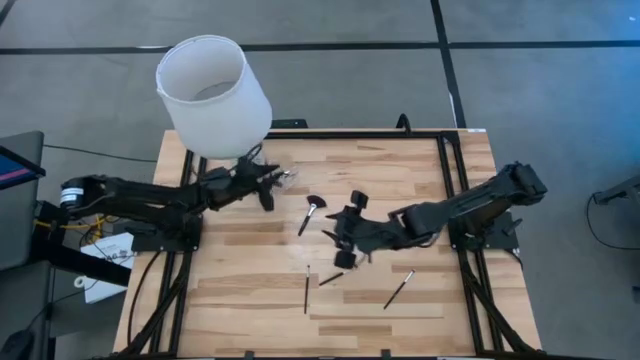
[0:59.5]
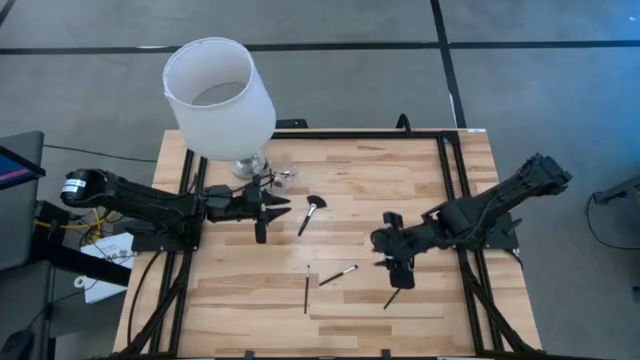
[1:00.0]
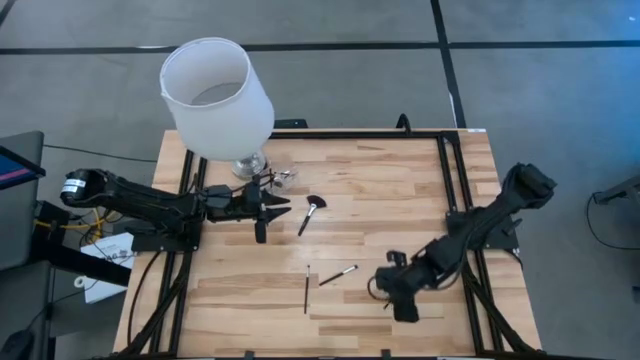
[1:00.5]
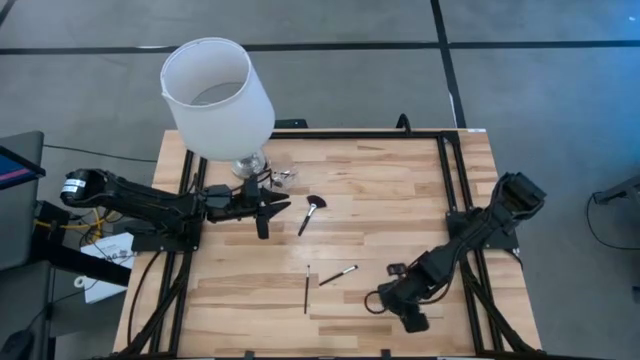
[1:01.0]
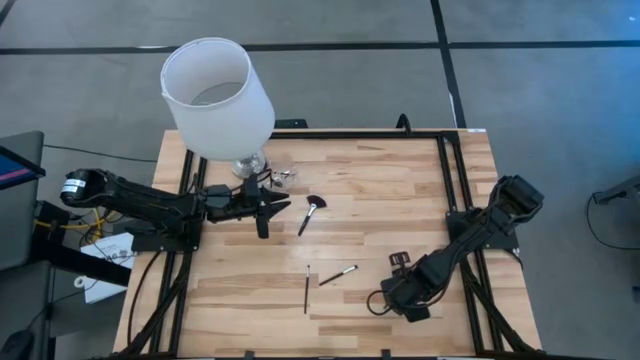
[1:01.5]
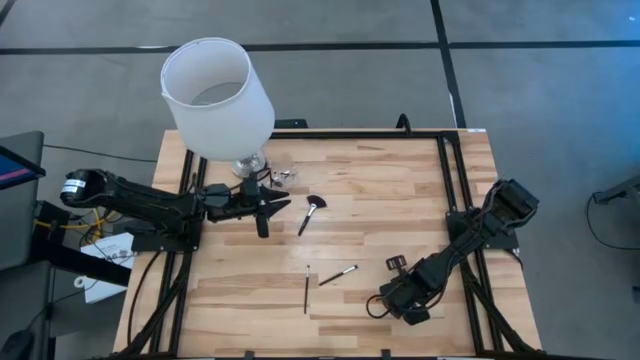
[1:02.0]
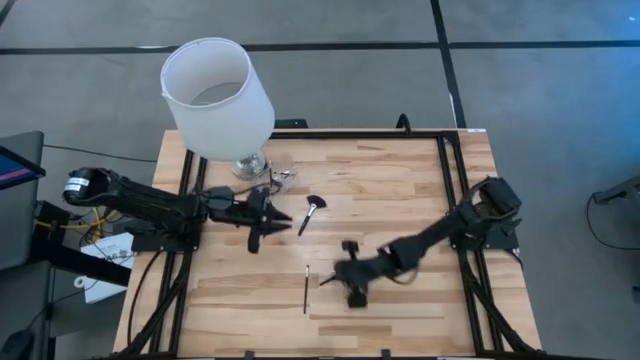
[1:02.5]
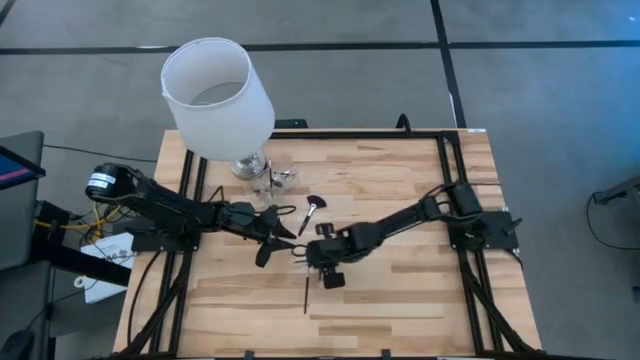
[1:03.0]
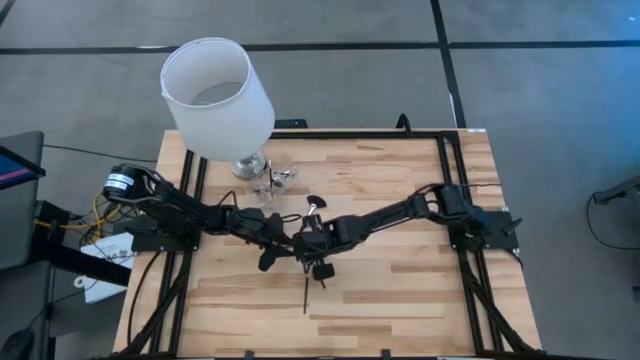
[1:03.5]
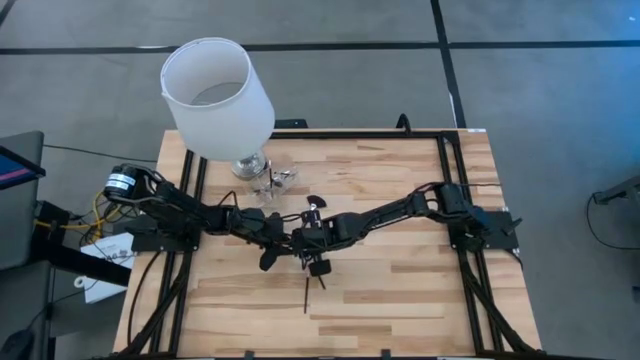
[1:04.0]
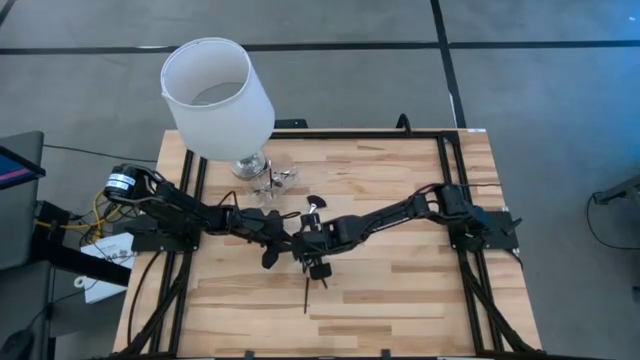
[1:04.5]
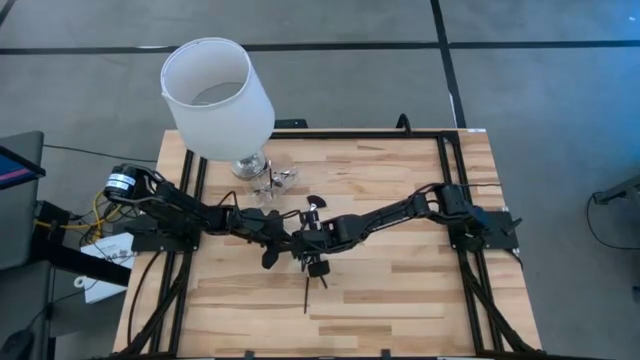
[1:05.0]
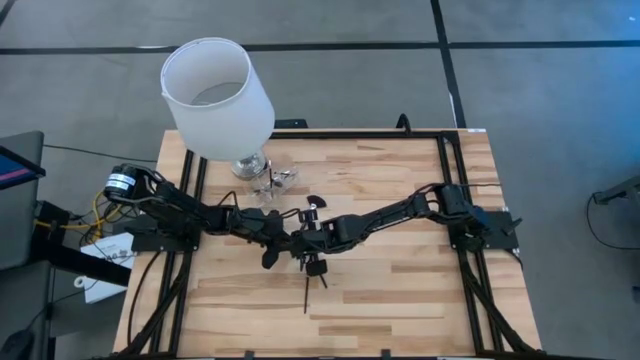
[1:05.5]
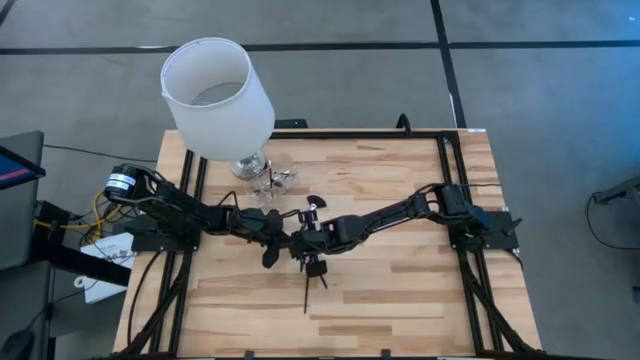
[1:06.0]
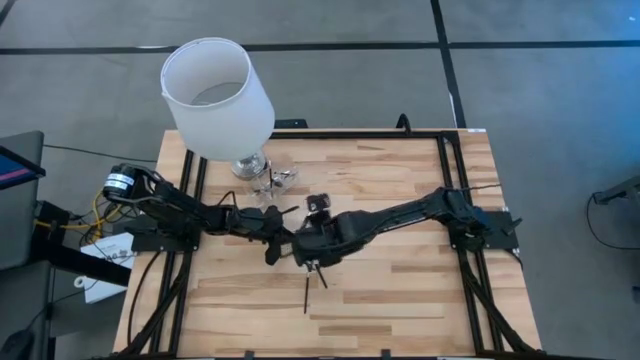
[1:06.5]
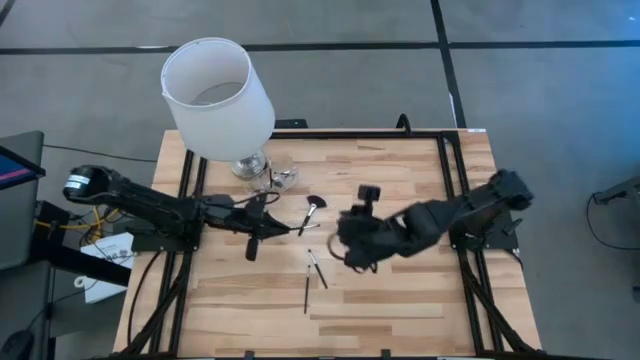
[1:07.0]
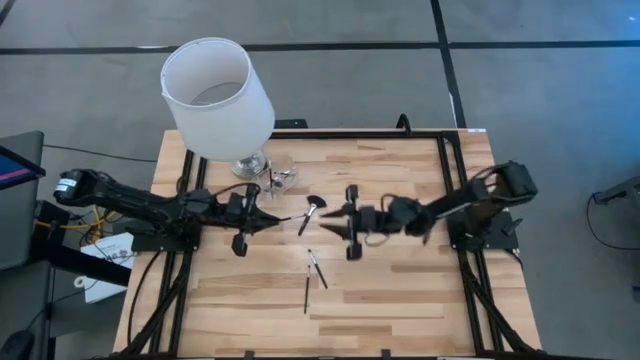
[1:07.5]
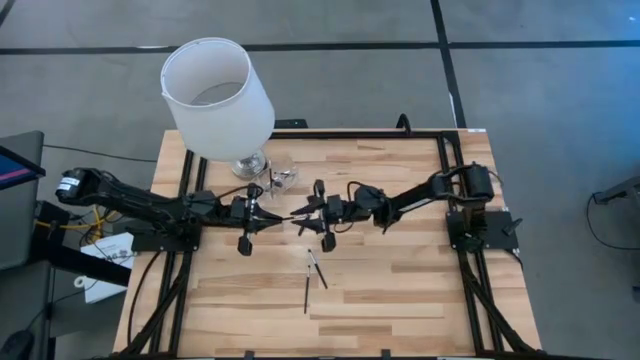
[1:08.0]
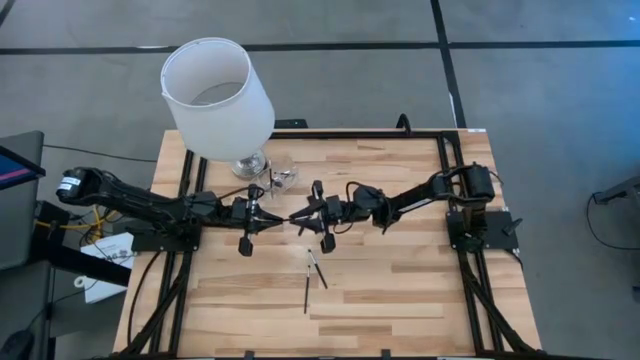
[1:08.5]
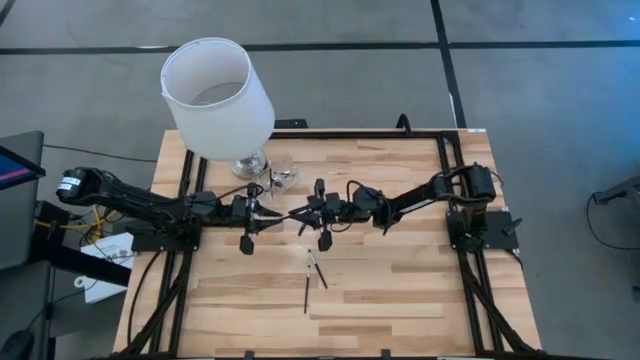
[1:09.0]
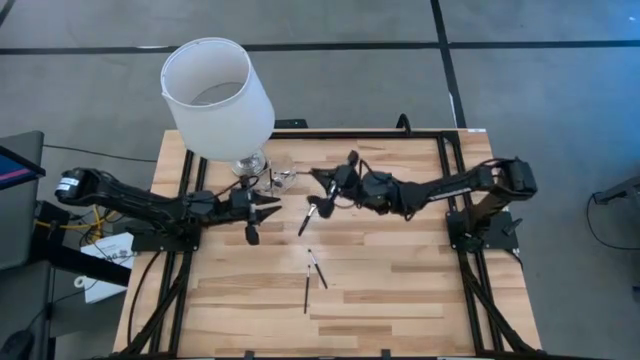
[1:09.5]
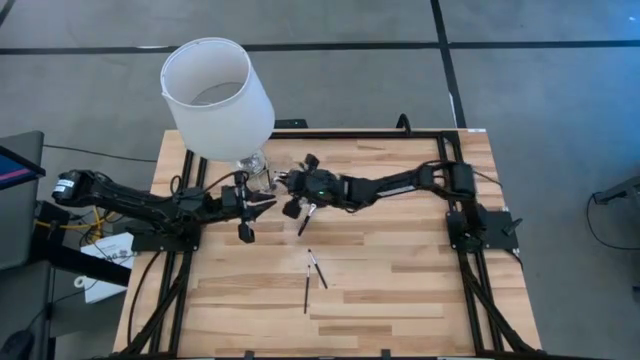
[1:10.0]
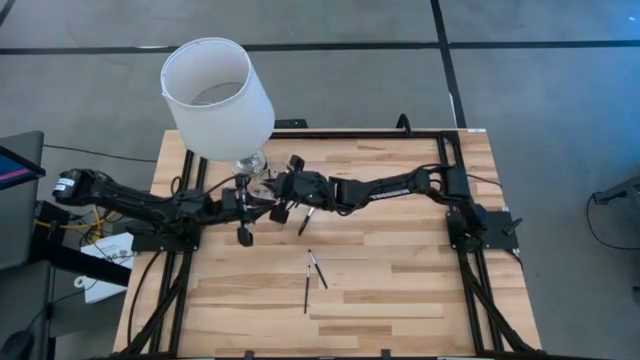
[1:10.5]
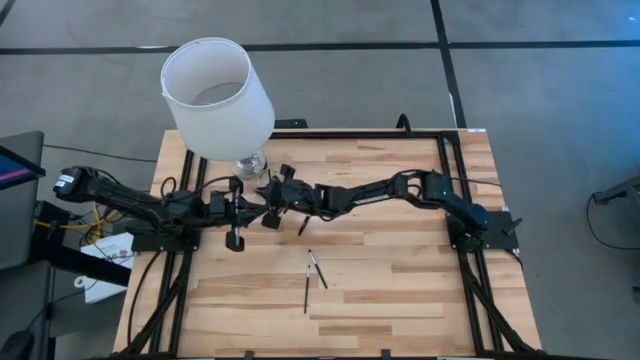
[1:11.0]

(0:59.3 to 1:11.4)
Task: Put items in baskets/containers
Put the black eyeshadow brush in the transparent organizer

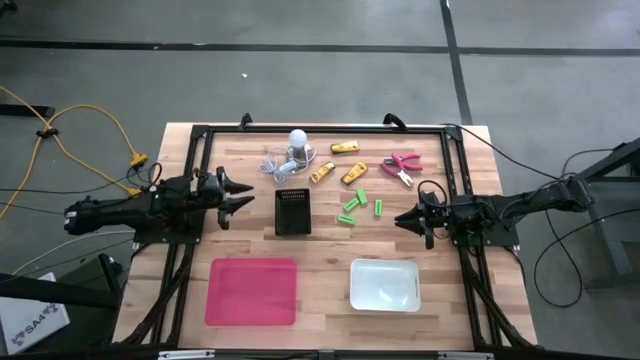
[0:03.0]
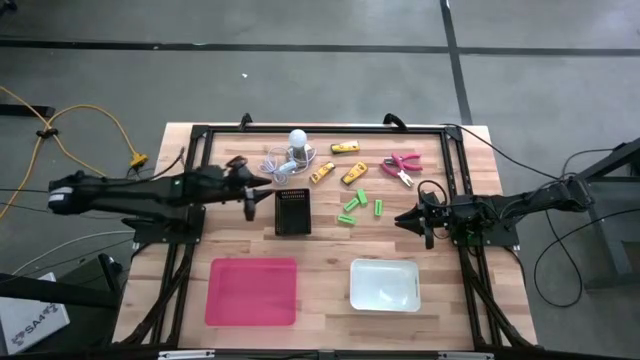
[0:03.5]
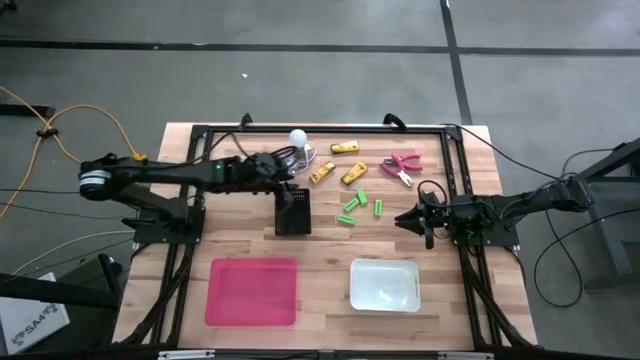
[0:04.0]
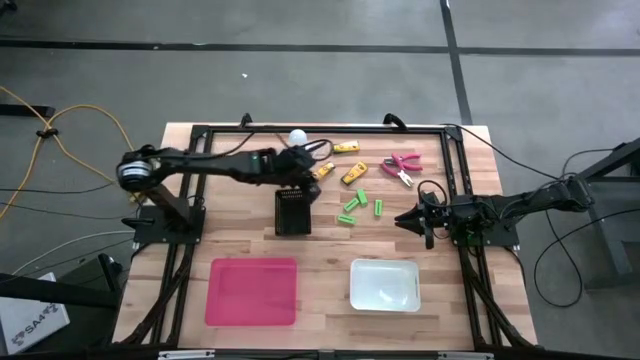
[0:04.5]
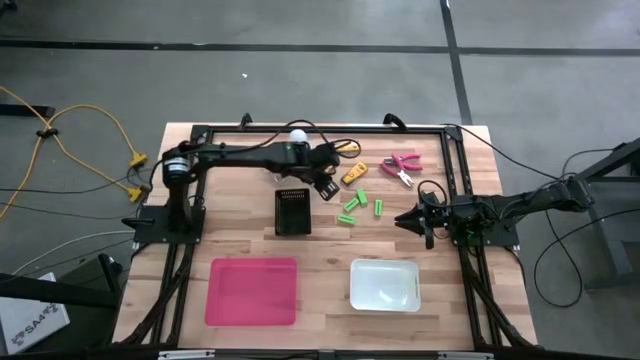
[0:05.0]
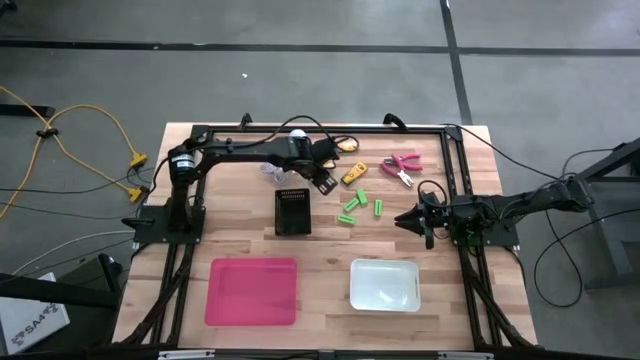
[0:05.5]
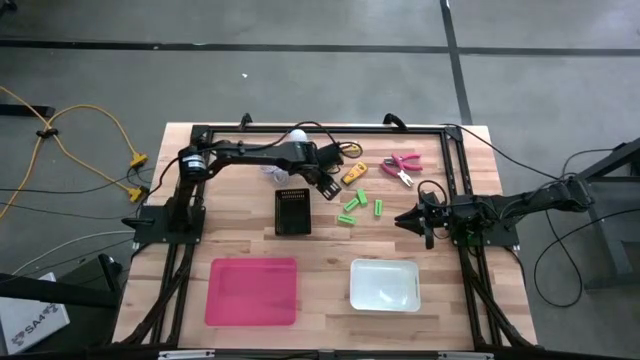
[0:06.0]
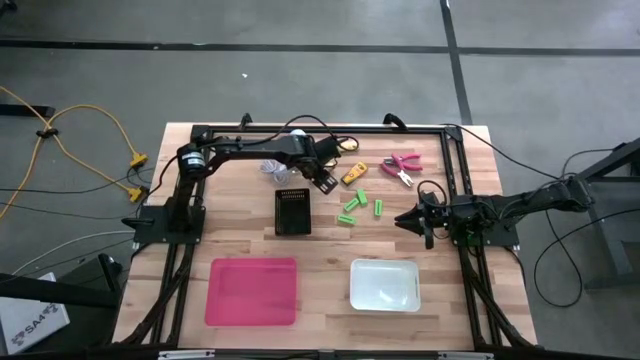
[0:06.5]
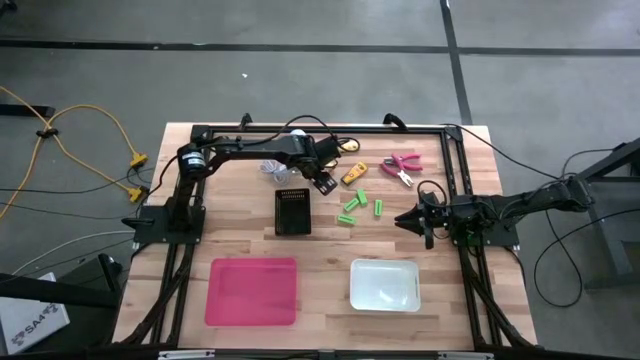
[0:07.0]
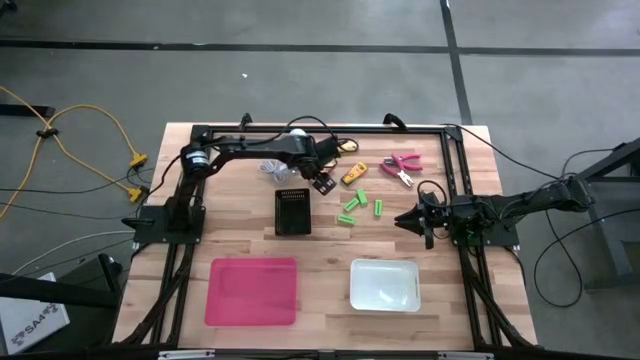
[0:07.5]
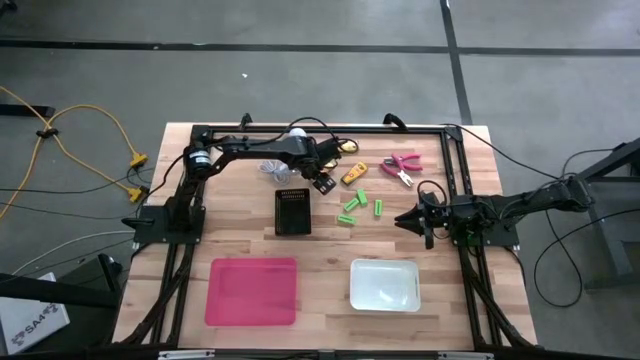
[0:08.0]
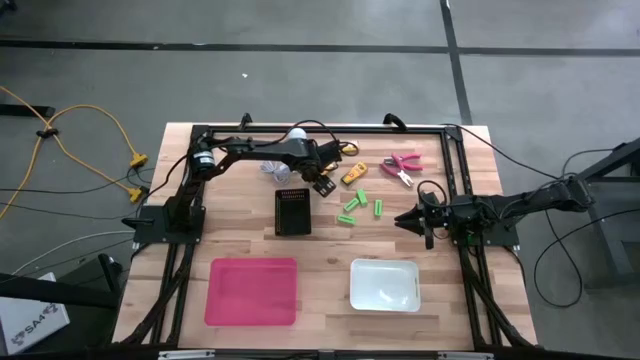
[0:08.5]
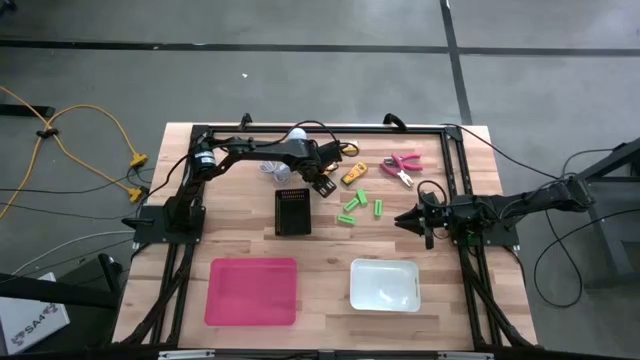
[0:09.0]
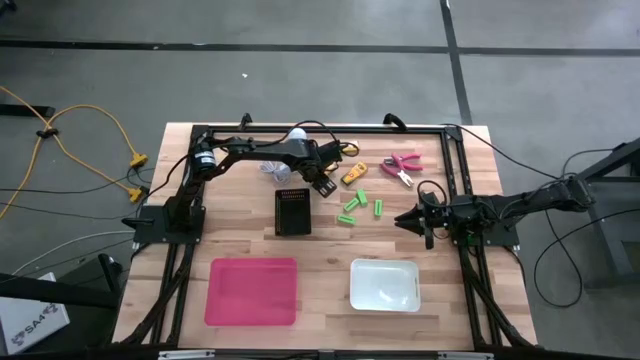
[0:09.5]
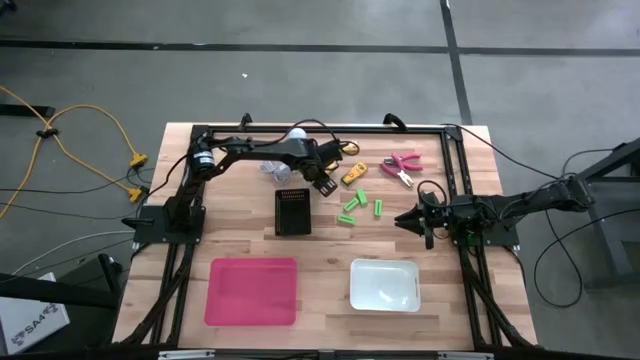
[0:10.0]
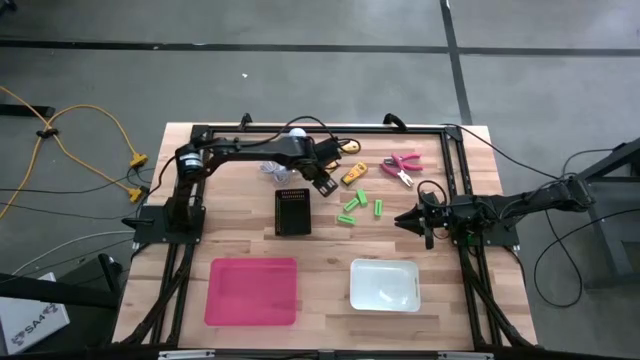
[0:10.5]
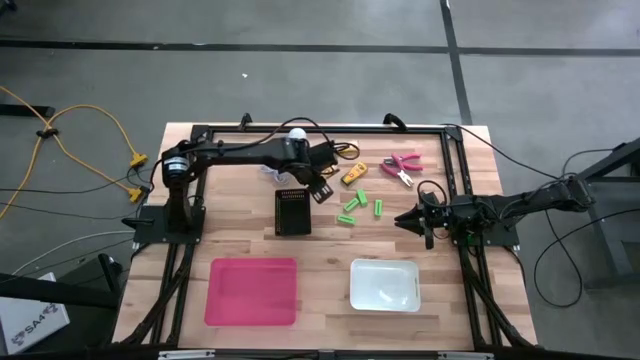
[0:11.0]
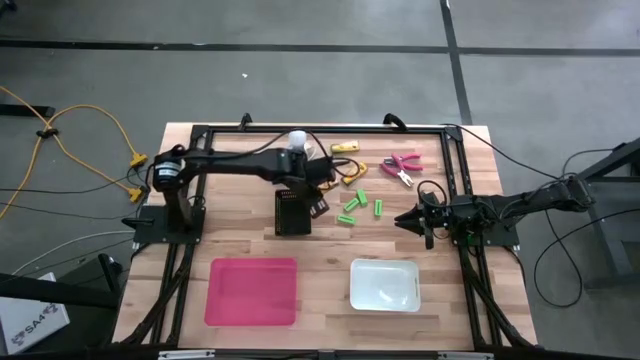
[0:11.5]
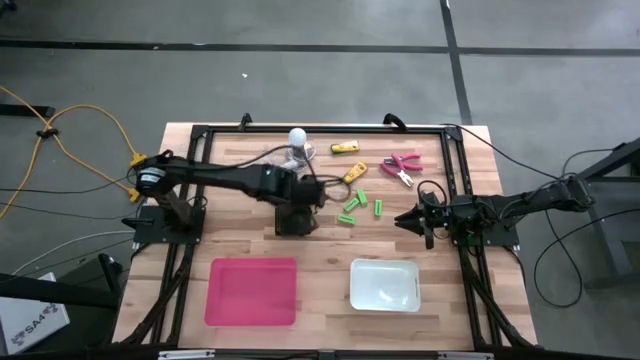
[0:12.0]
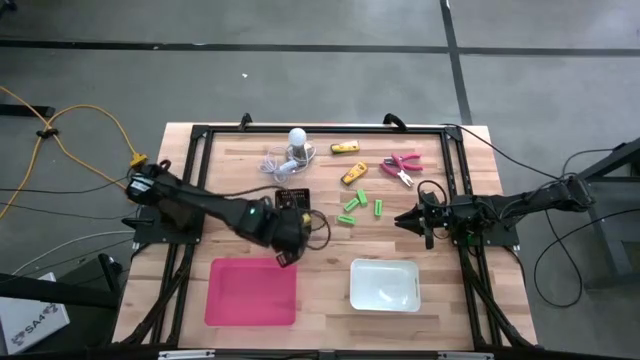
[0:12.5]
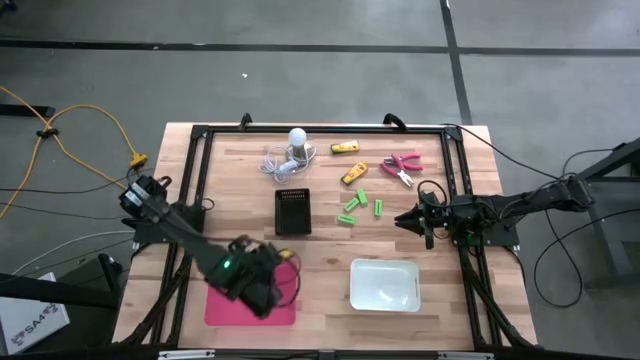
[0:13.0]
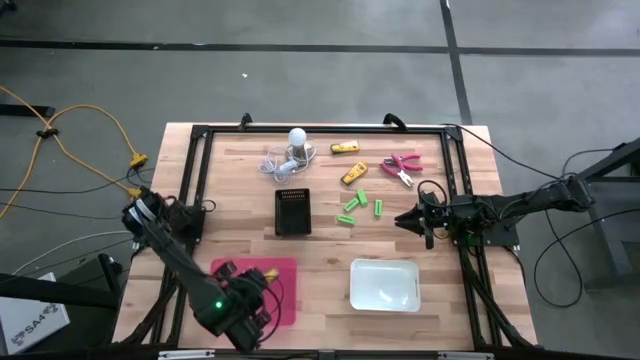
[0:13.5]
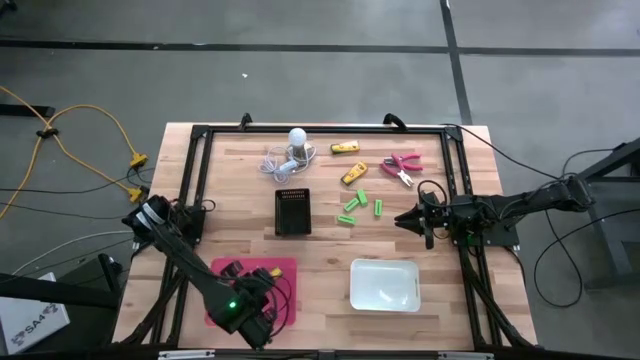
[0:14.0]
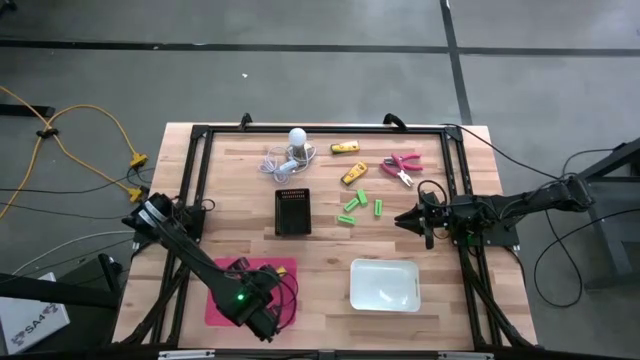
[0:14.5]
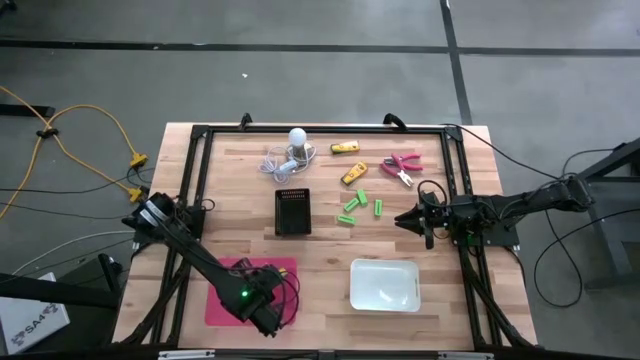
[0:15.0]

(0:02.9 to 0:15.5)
Task: Pick & Place School Supplies
Put the yellow crayon box into the pink bin
